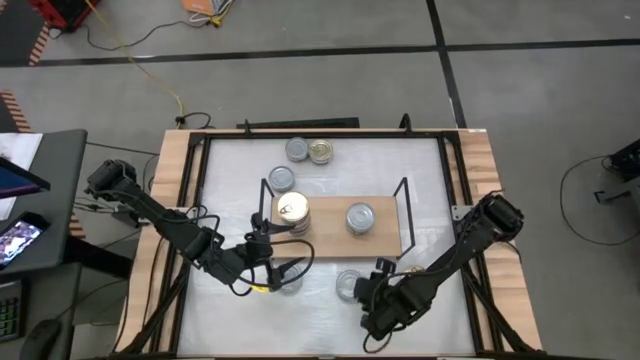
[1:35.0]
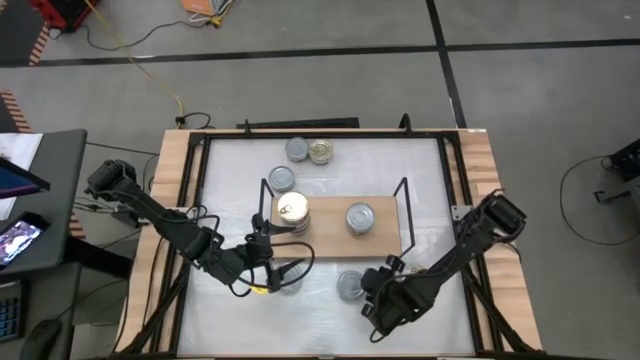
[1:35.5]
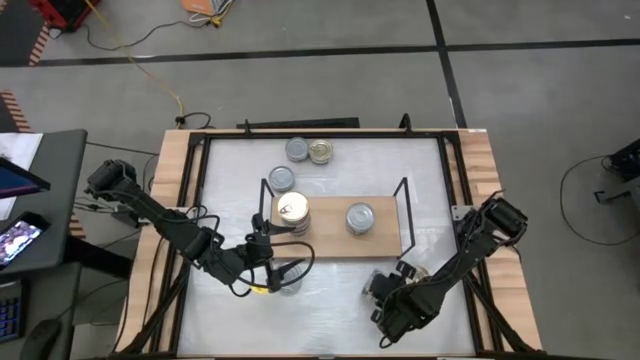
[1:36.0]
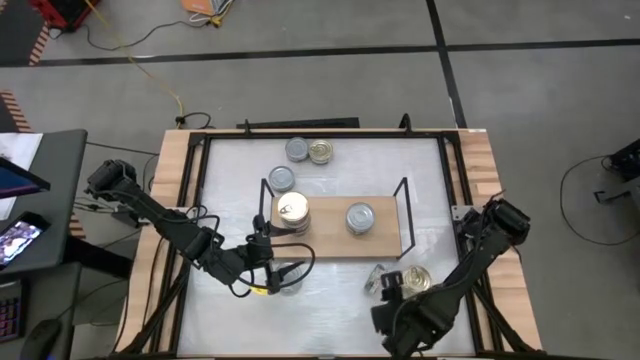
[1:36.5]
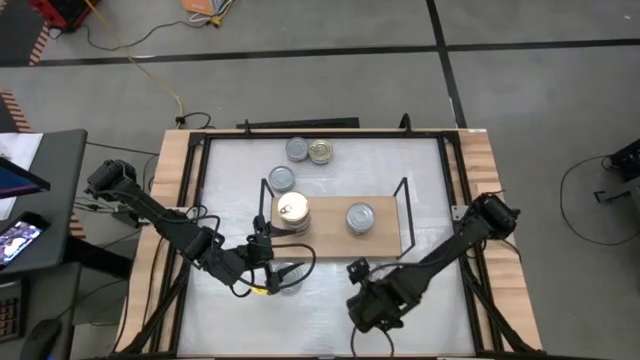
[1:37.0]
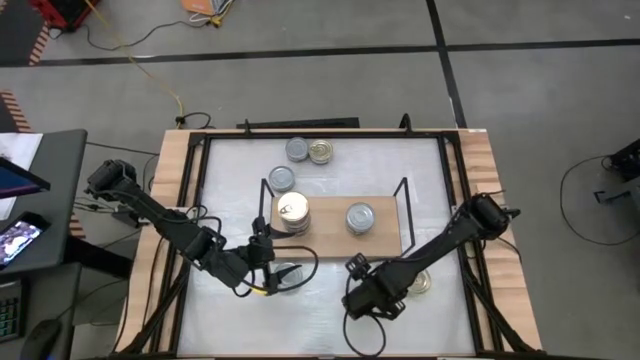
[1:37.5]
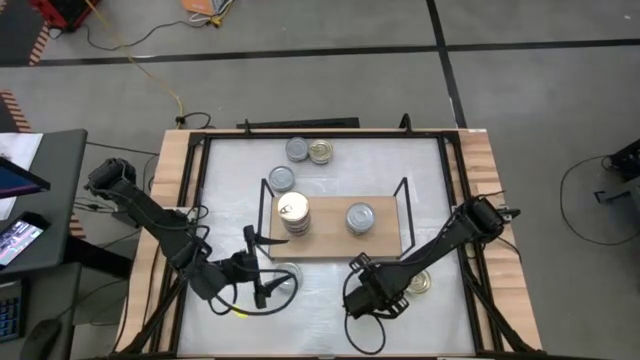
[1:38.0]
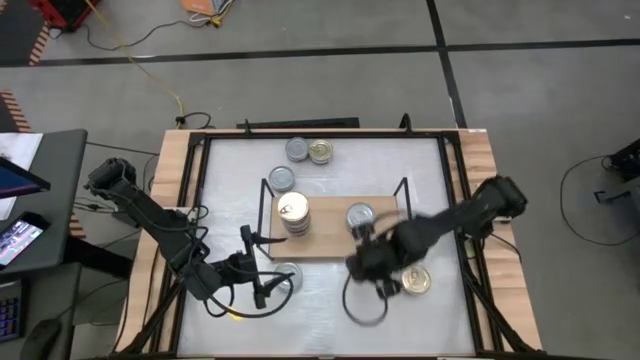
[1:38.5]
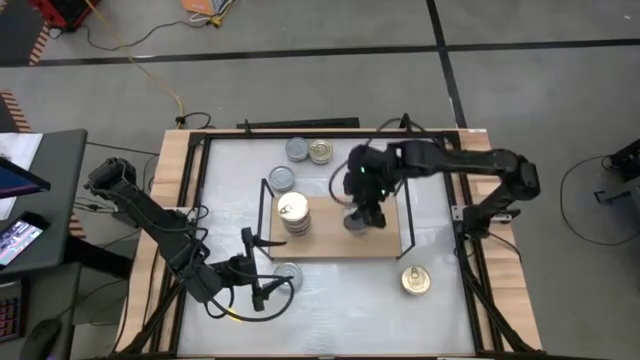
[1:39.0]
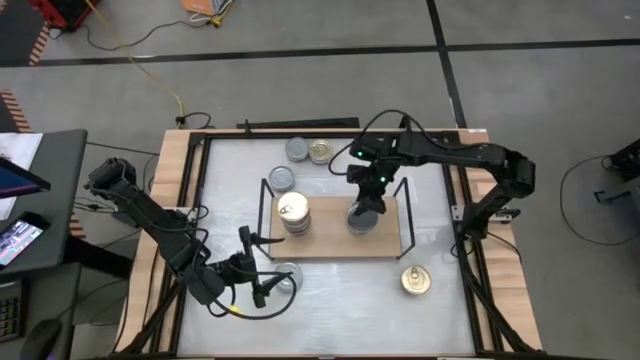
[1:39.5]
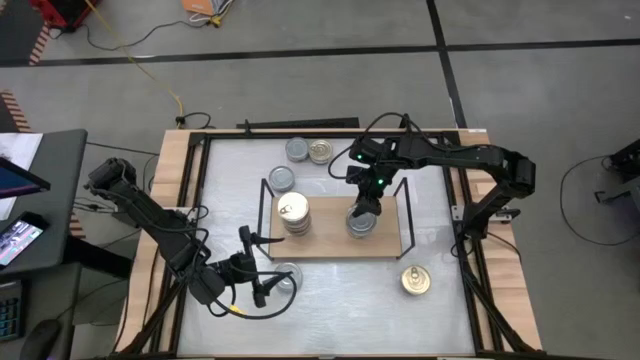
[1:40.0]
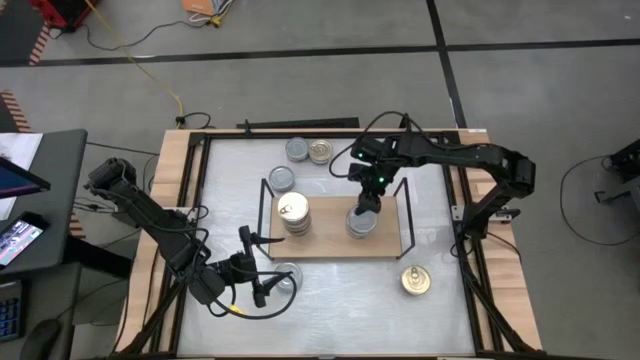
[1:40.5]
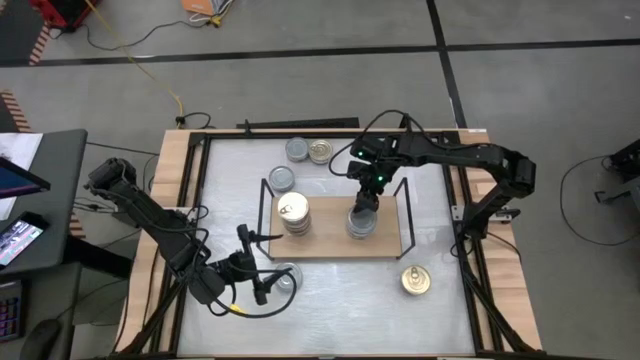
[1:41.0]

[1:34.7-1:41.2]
Task: Stack canned seafood by type on shelf
Stack the green tuna can on top of the green tuna can on the shelf

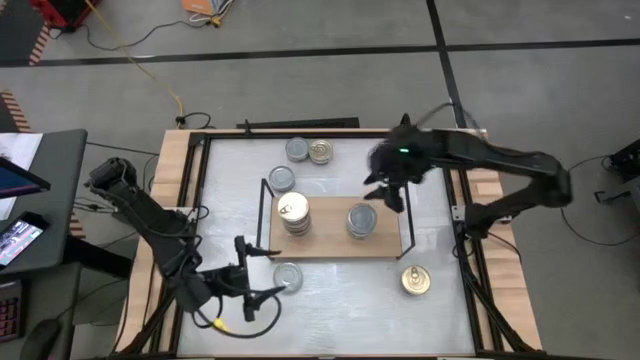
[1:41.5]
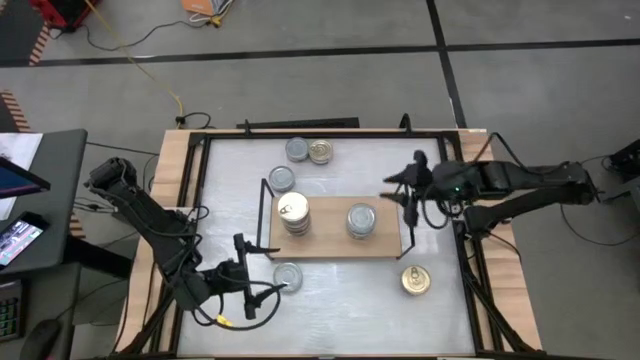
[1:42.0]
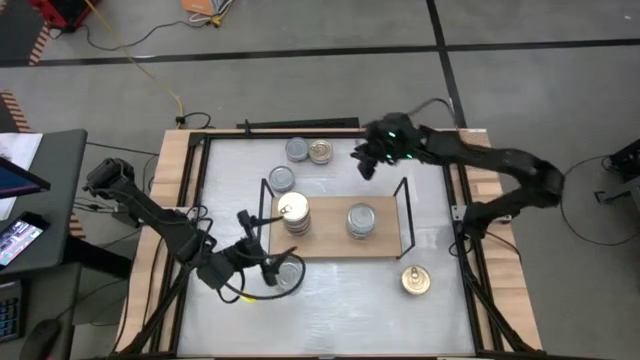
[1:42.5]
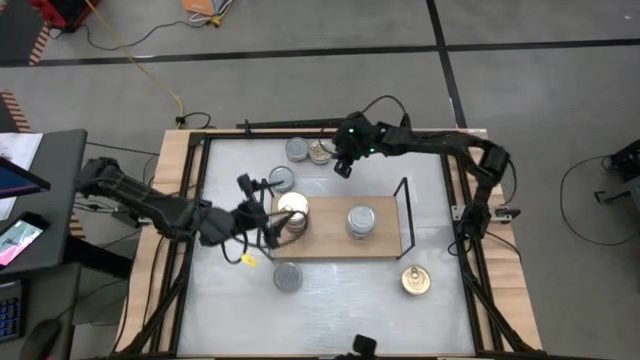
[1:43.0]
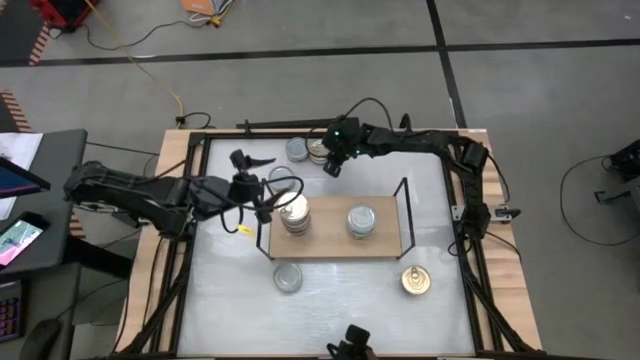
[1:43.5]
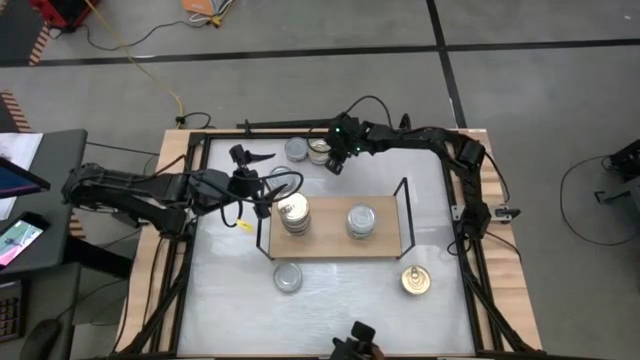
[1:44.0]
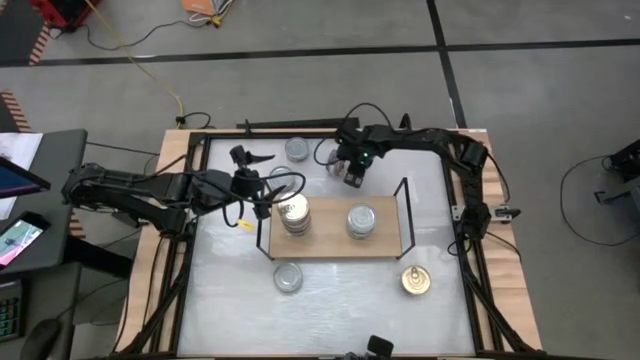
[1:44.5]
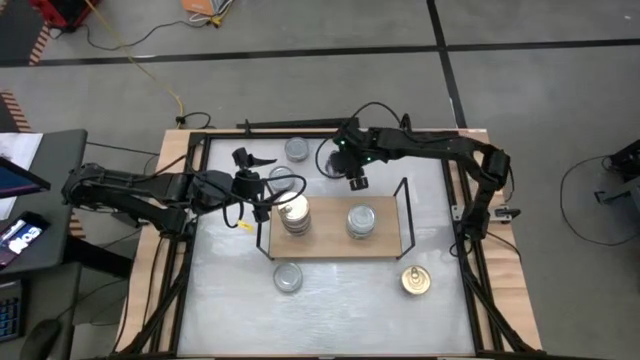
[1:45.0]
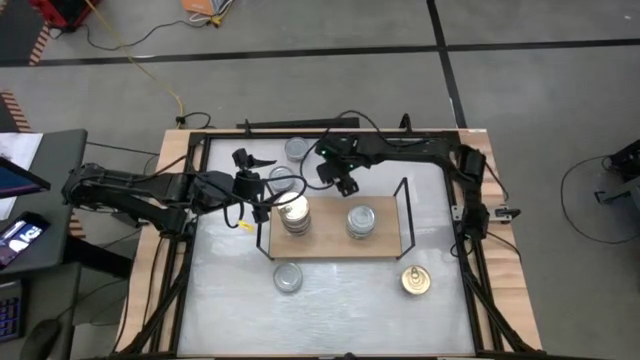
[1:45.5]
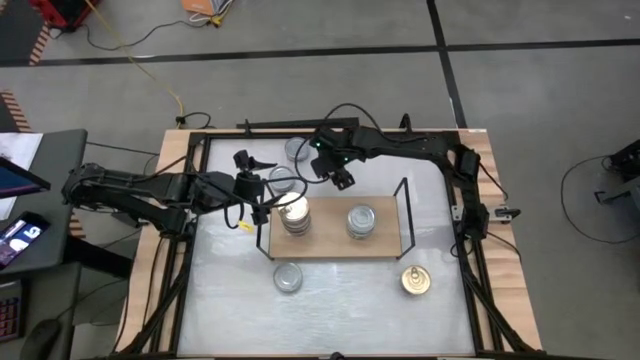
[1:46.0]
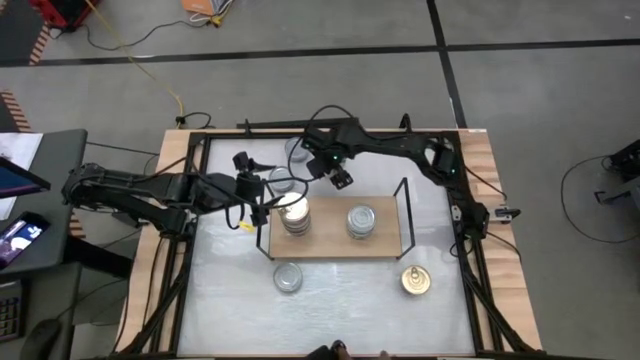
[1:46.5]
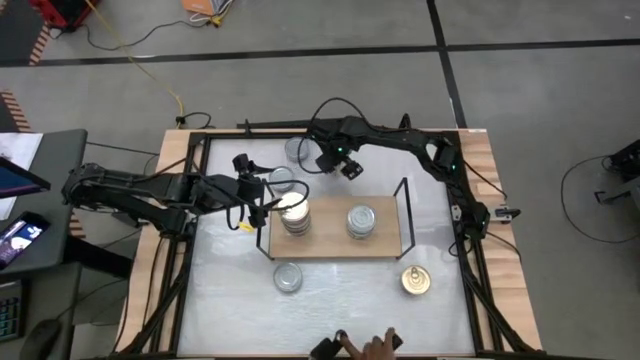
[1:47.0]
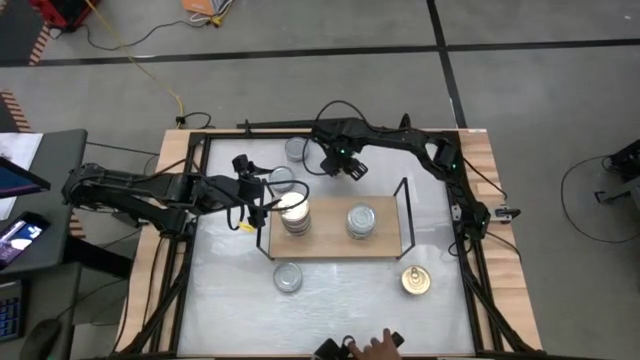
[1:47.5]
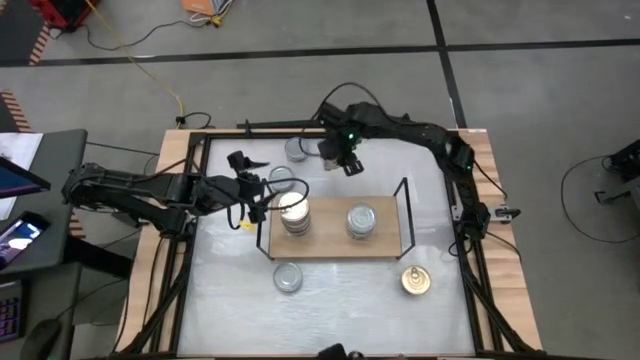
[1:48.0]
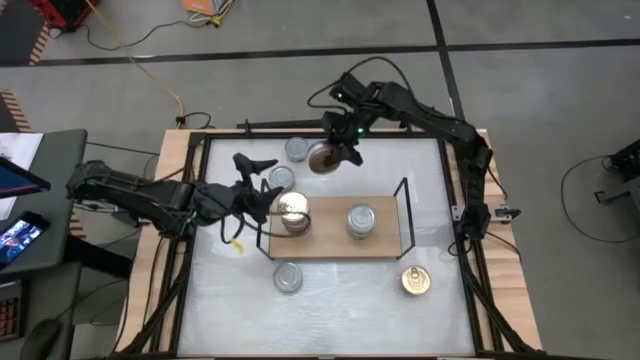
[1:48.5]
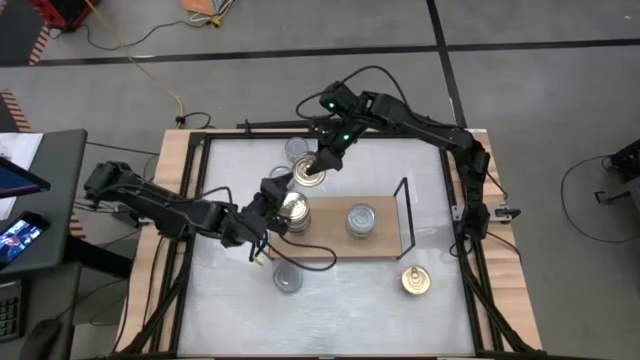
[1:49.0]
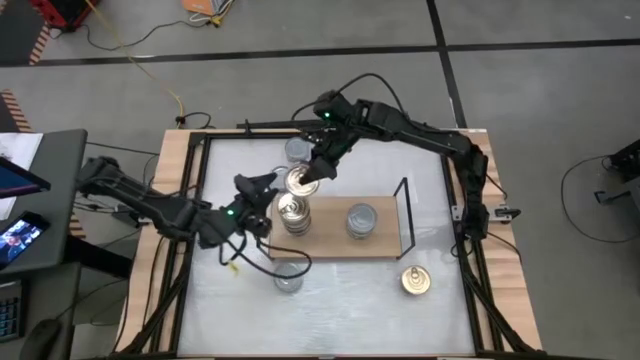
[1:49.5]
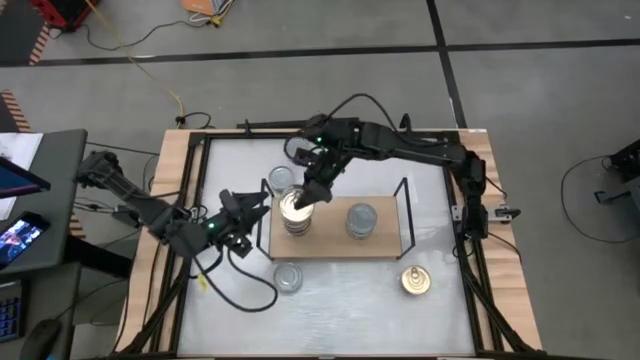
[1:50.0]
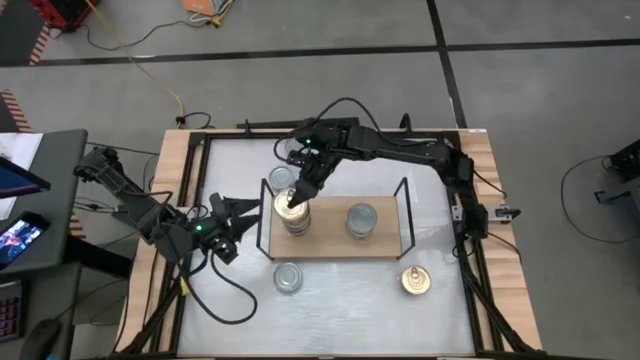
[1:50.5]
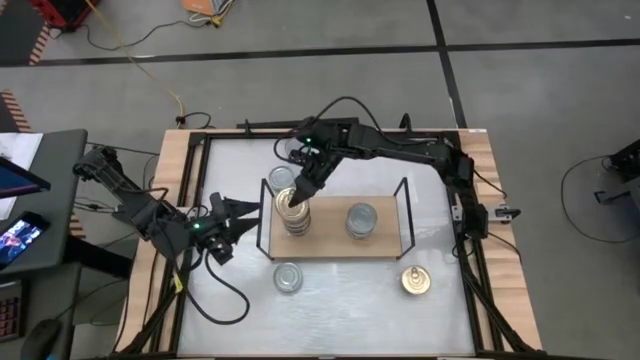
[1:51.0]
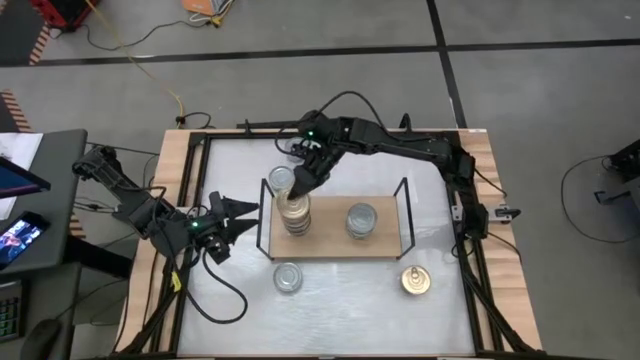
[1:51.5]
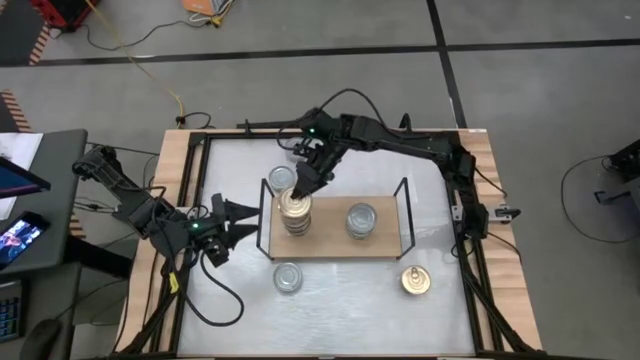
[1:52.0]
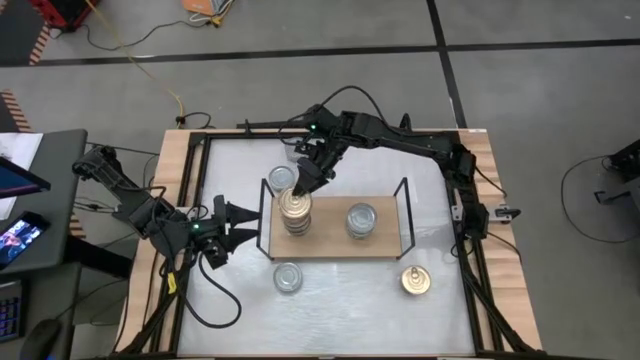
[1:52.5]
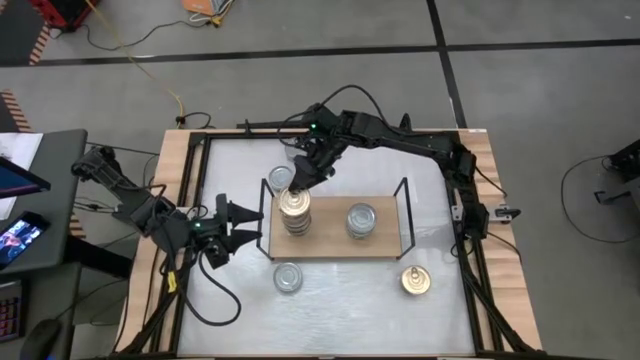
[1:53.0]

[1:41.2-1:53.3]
Stack the blue tuna can on top of the blue tuna can on the shelf

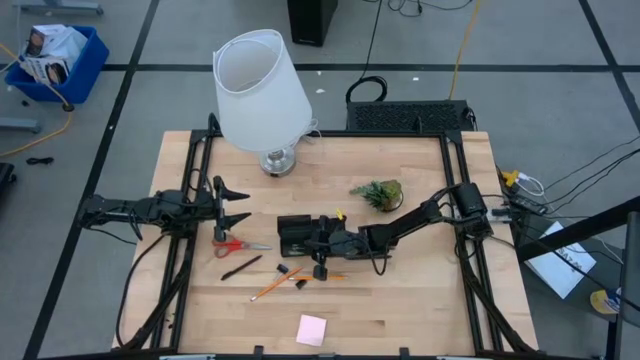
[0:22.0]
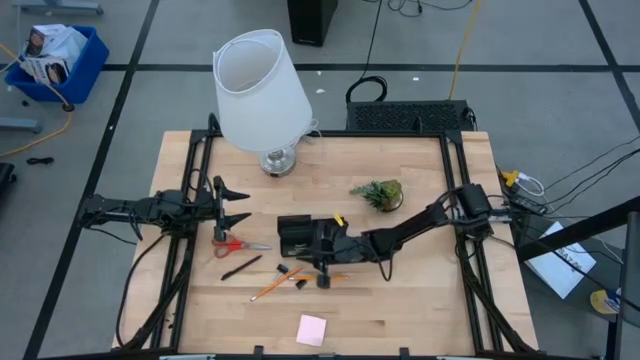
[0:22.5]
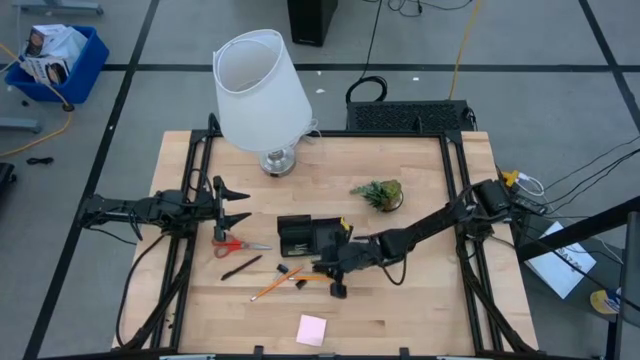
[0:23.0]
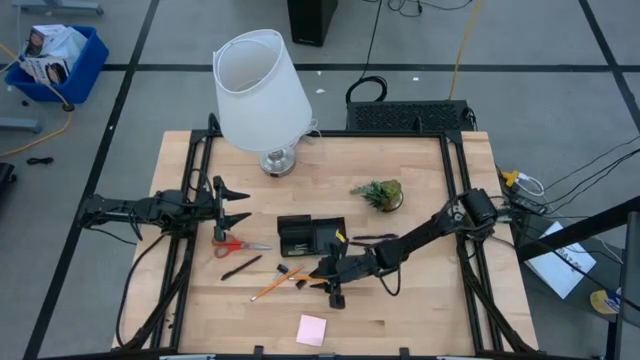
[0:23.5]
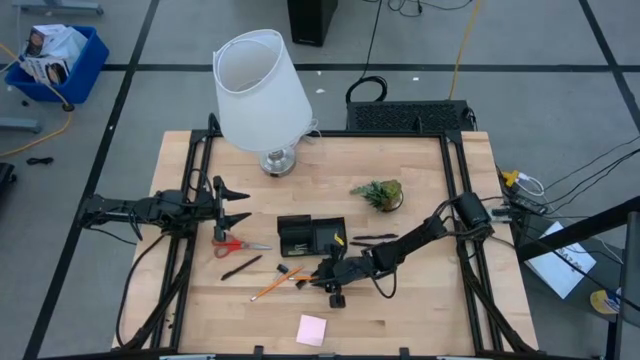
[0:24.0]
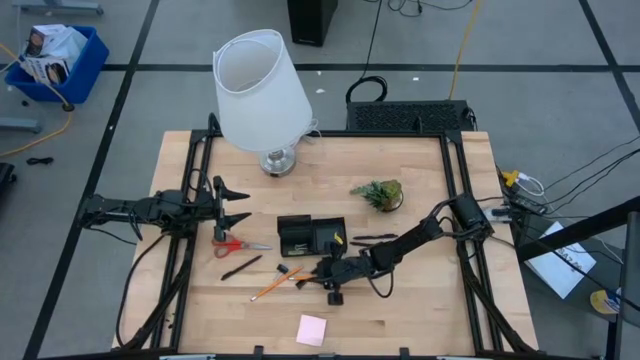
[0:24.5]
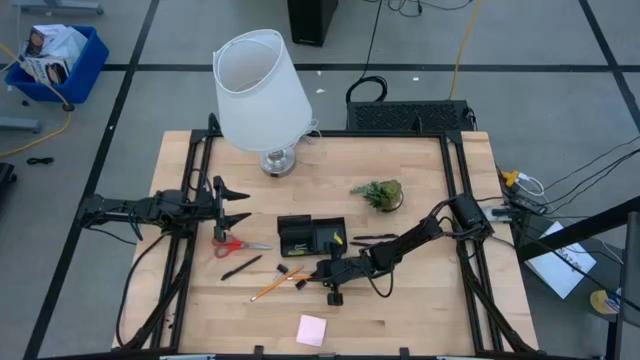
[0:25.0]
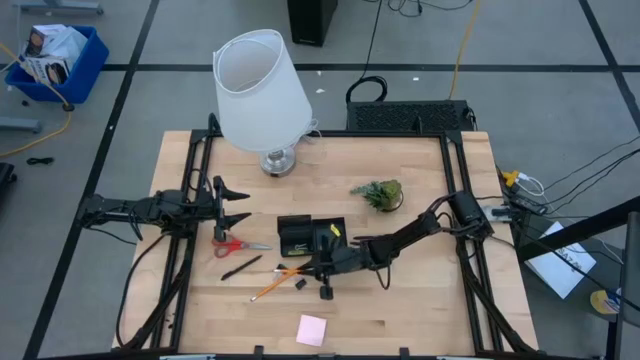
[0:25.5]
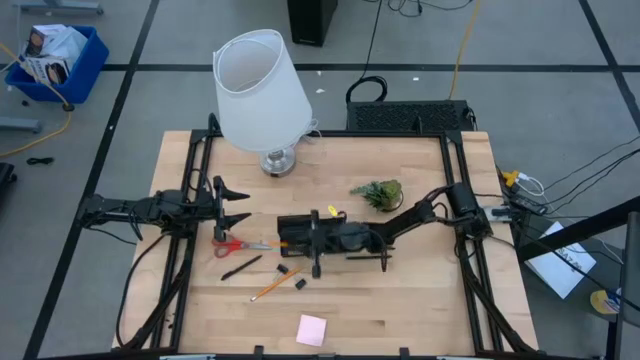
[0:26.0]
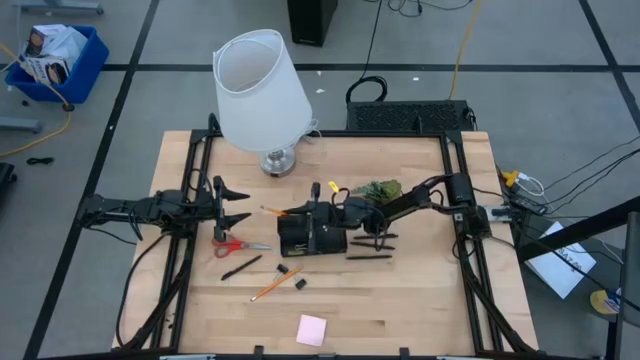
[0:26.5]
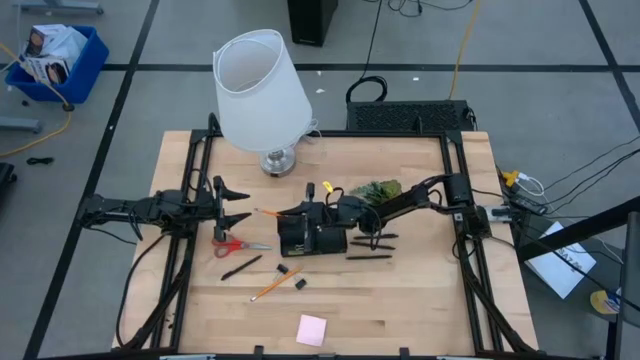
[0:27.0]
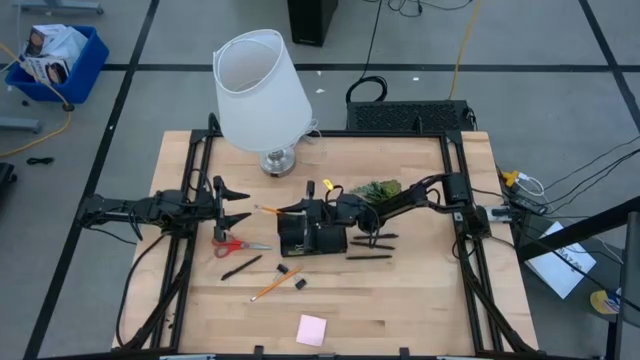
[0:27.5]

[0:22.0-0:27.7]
Task: Pick and place office supplies into organizer
Put the right orange pencil into the black desk organizer
